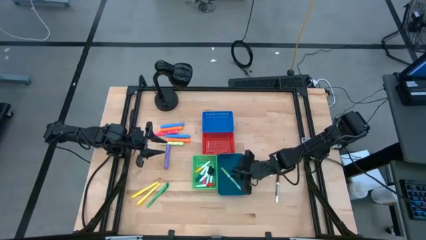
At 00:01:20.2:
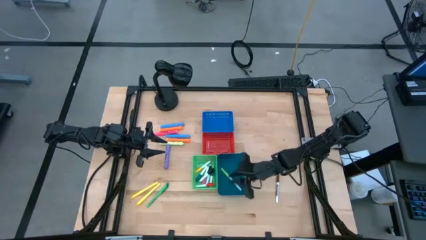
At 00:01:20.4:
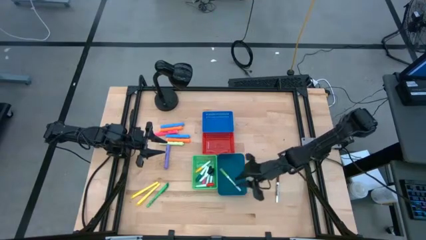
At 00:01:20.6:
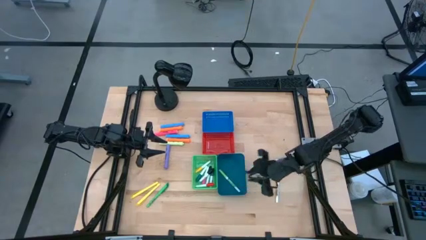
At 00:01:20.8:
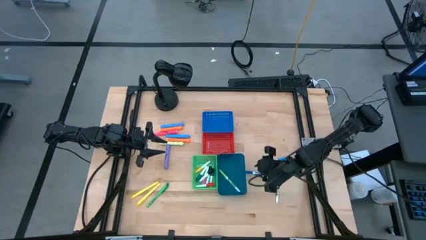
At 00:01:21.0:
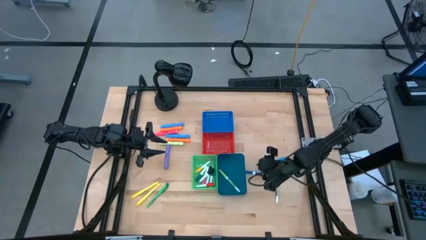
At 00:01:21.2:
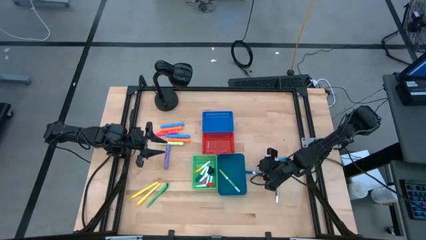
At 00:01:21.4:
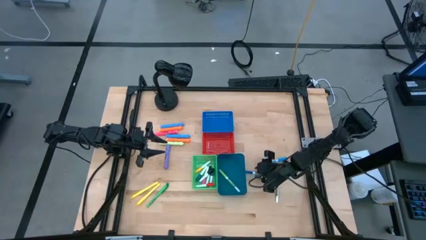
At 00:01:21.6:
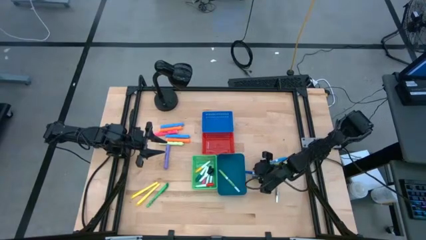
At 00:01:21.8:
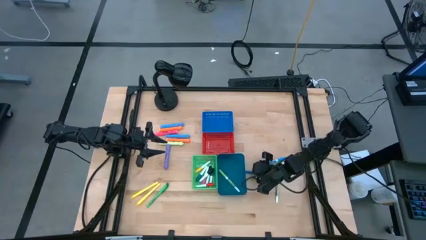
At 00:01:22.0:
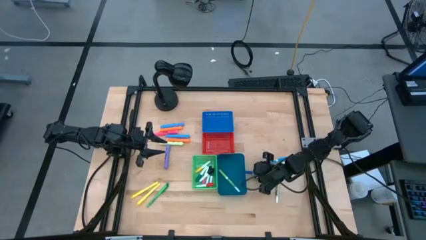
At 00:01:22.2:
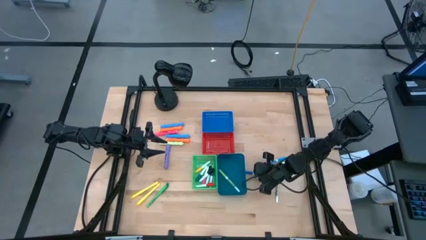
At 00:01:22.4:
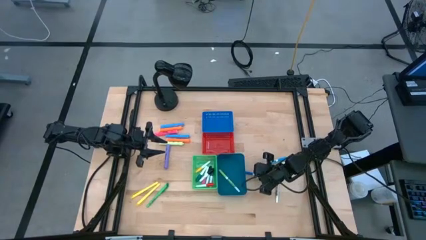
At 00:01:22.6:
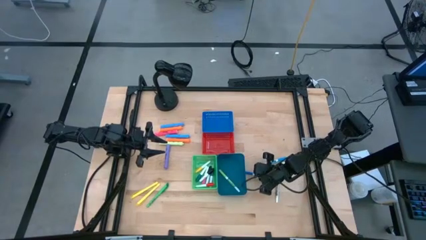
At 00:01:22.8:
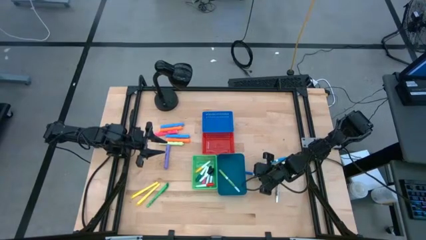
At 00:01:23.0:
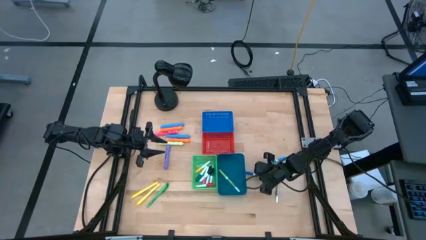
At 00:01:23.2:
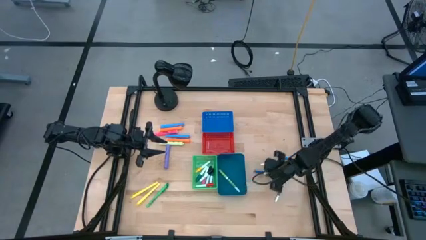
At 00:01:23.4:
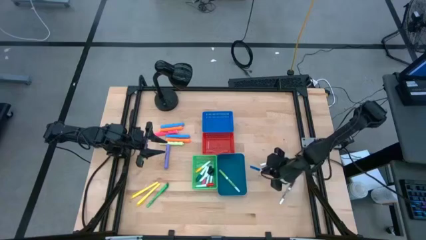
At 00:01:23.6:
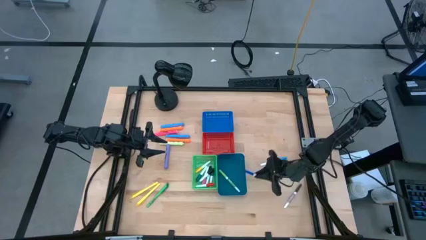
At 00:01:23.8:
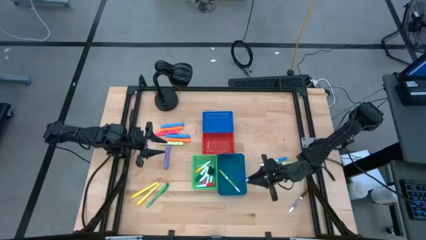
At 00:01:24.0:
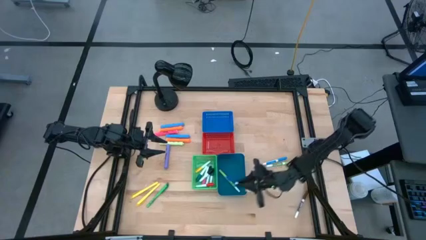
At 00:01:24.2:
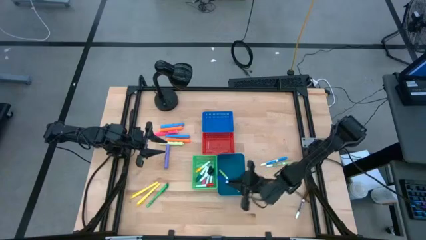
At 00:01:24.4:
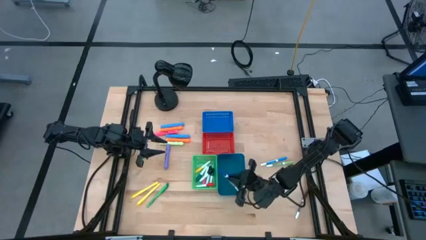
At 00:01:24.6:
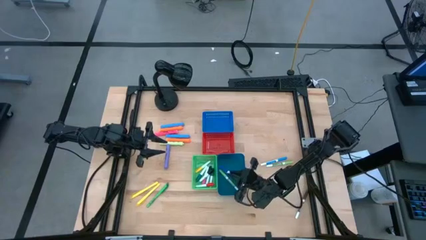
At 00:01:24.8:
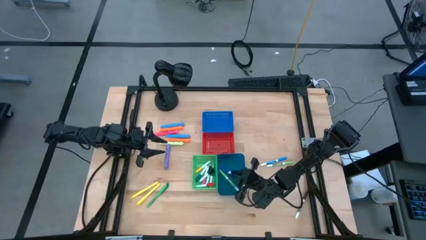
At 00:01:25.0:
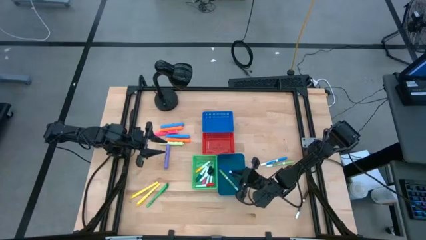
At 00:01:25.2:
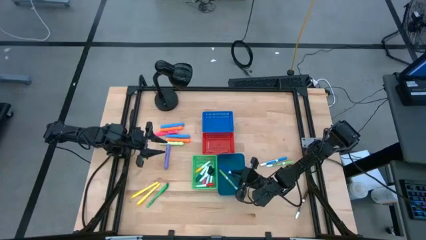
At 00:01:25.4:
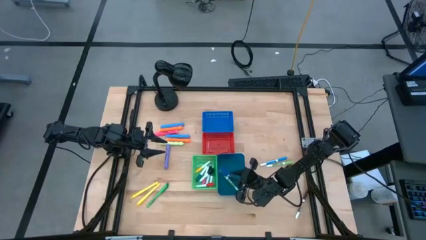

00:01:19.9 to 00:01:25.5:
Task: Pick & Place Markers
Put the blue marker pen into the dark blue bin

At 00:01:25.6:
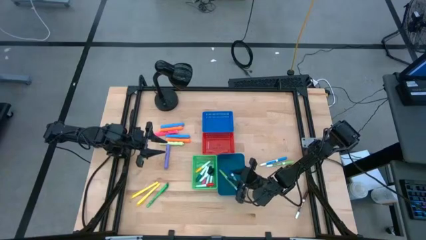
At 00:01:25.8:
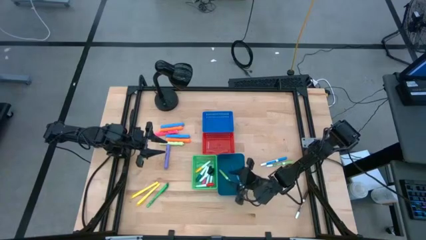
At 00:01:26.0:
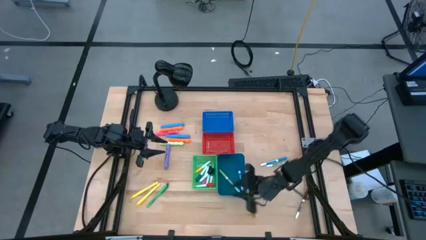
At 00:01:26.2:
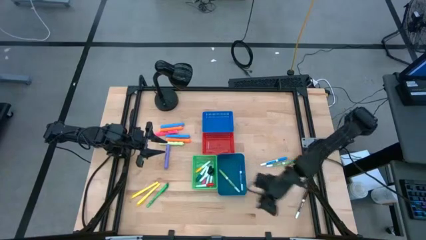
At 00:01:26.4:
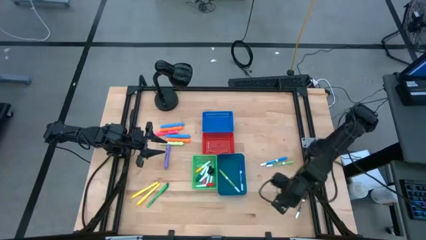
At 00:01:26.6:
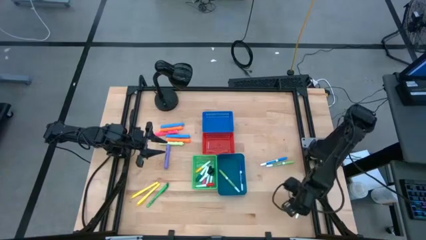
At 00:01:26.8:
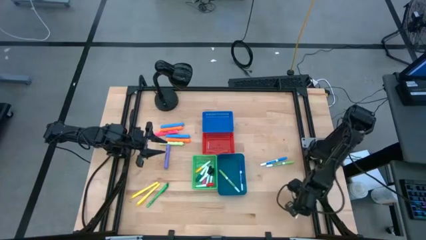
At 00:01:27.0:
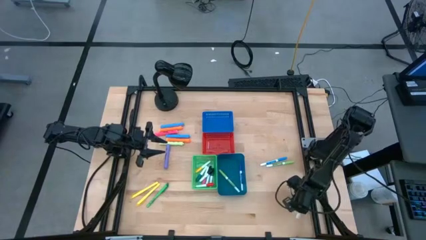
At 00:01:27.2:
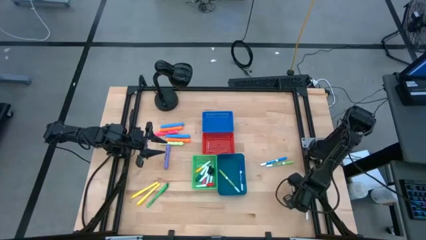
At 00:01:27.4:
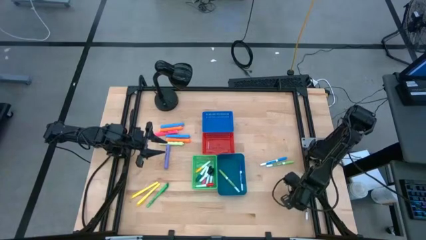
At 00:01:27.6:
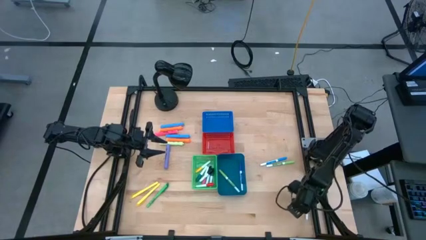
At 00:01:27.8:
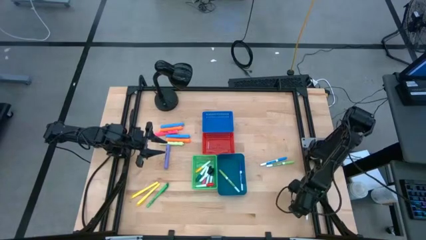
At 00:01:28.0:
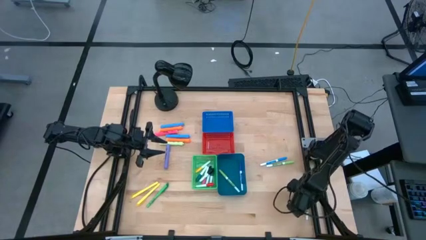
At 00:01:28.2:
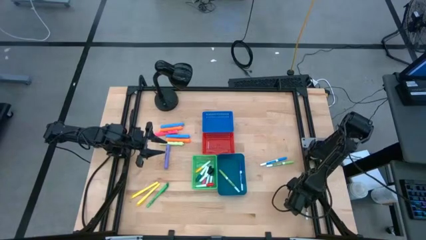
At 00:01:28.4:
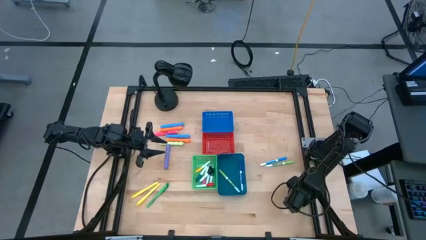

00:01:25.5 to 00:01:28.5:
Put the brown marker pen into the dark blue bin

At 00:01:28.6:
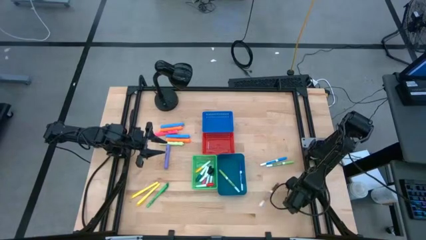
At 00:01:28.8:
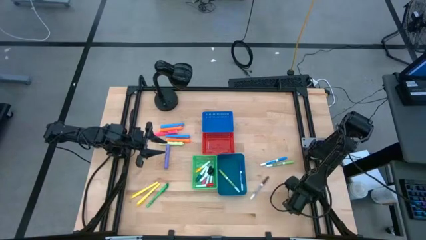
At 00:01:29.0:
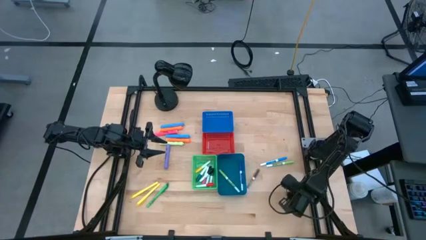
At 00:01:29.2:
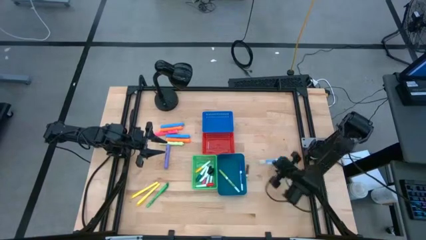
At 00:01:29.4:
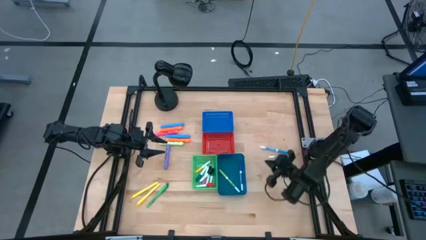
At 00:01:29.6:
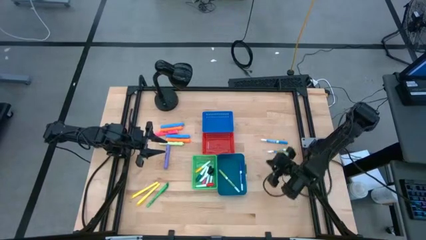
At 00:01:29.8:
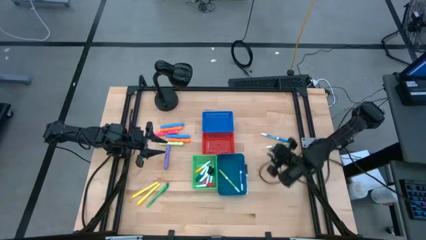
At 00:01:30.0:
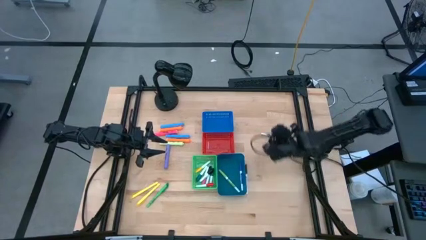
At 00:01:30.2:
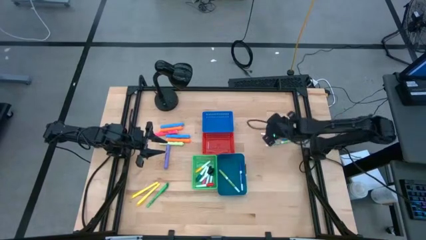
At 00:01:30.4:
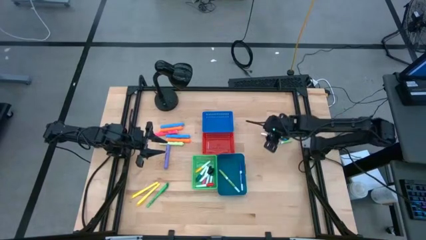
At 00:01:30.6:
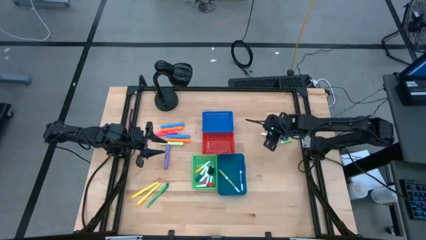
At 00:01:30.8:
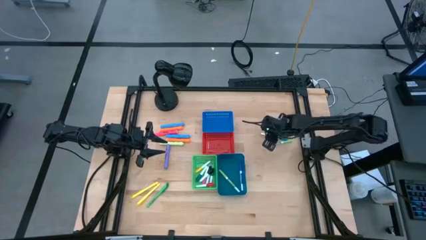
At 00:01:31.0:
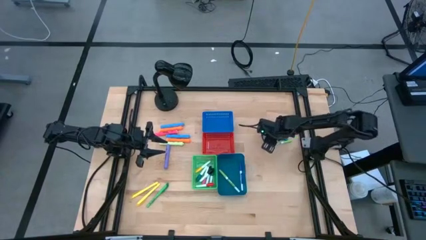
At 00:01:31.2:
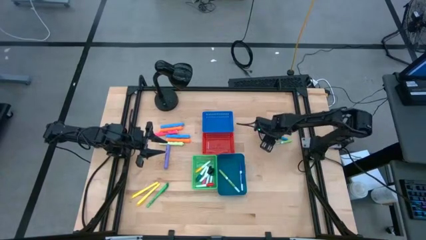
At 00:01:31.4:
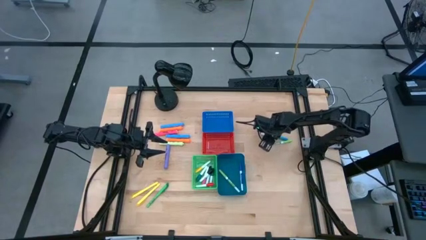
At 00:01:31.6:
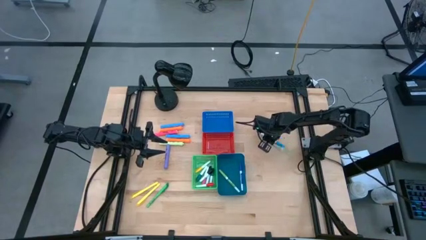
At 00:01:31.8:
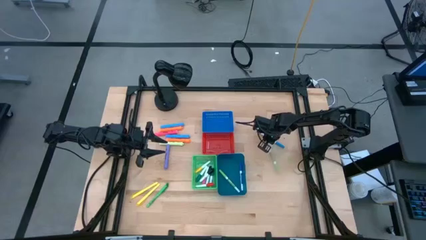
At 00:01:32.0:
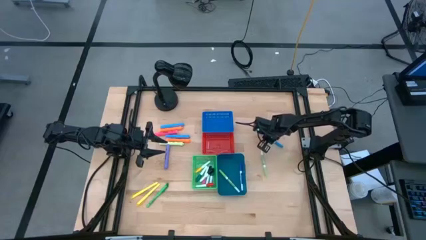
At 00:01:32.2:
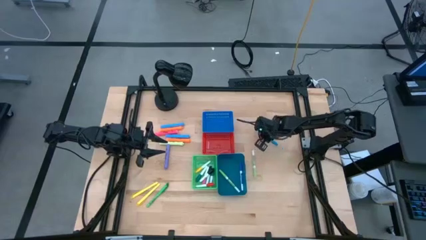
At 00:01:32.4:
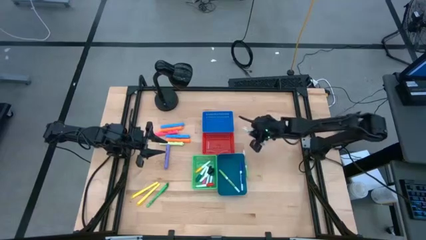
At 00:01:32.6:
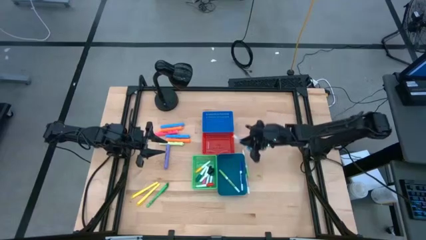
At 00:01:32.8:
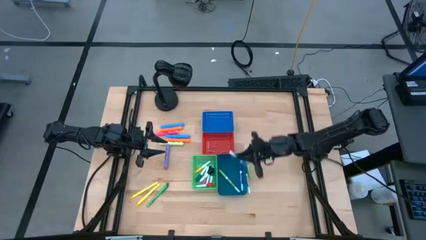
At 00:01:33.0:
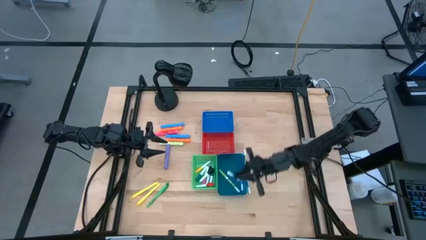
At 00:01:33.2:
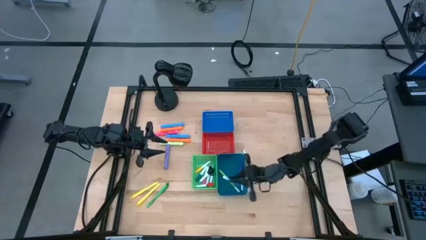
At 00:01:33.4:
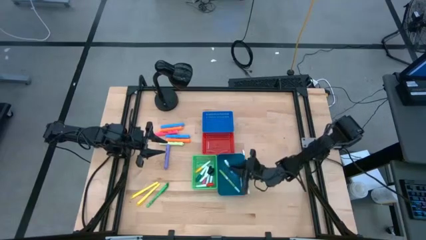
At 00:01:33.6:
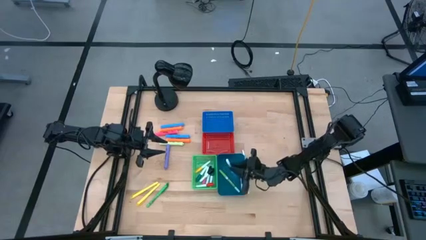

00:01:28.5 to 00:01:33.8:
Put the light blue marker pen into the dark blue bin

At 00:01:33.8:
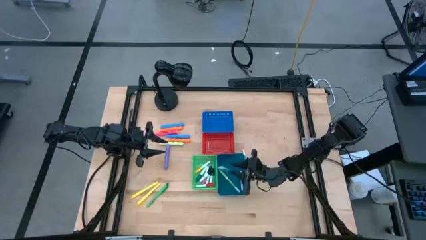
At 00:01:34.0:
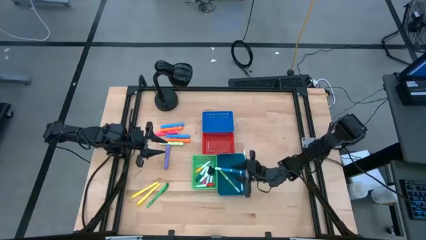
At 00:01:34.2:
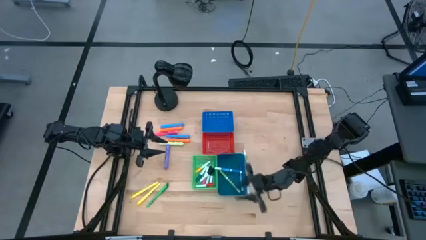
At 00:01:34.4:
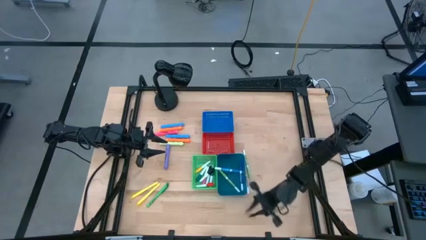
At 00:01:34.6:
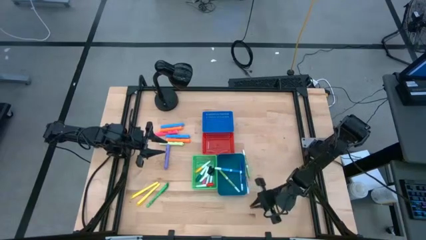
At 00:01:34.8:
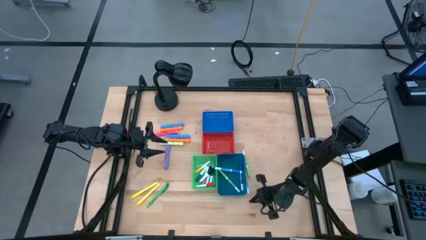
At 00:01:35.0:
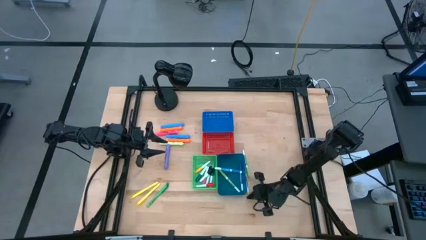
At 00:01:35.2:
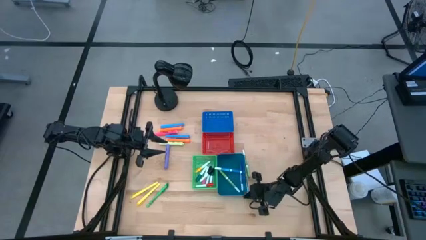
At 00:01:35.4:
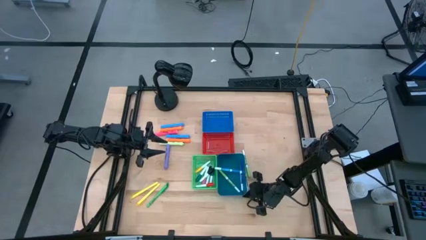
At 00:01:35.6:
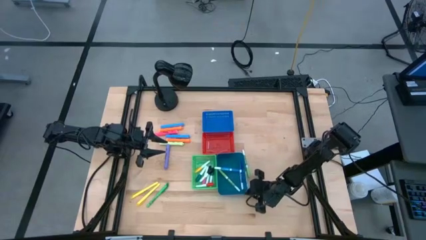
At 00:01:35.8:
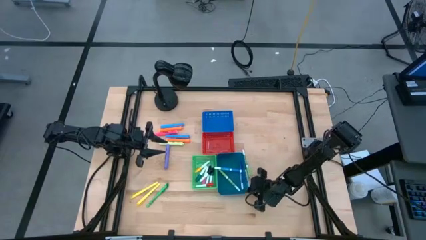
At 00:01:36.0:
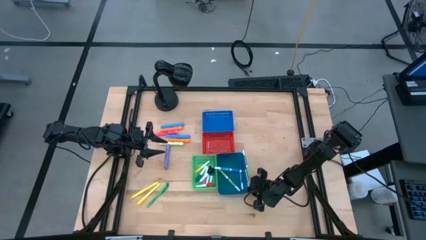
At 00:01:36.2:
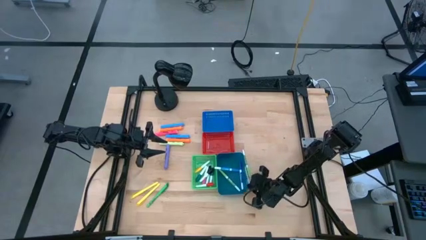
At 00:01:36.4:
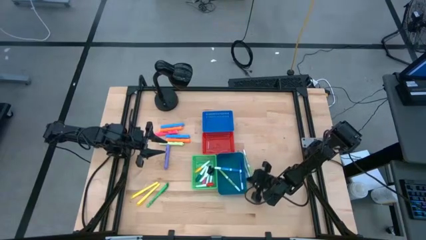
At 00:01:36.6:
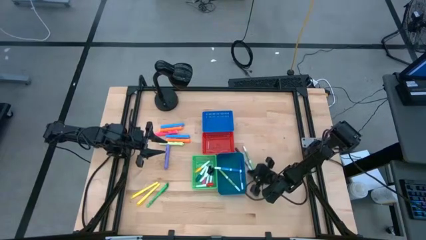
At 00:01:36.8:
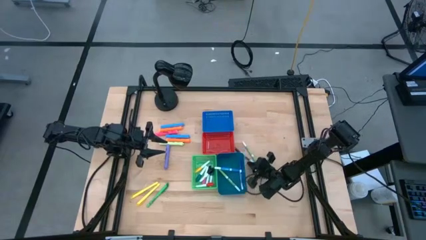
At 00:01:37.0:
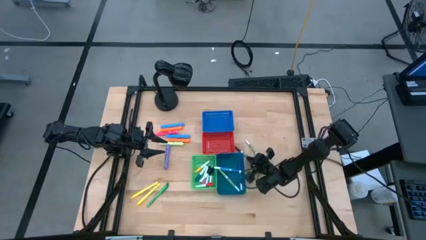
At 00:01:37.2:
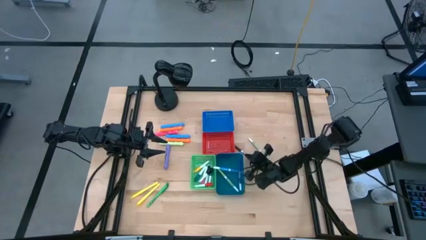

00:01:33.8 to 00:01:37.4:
Adjust the marker pens
